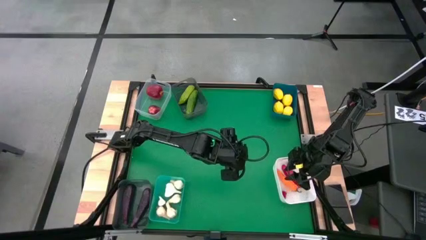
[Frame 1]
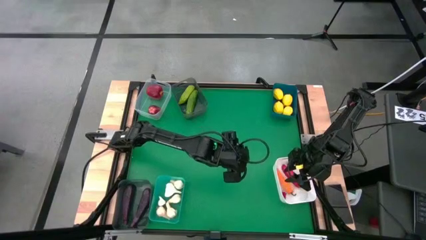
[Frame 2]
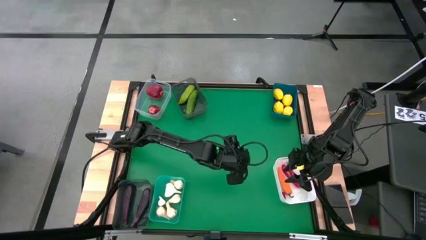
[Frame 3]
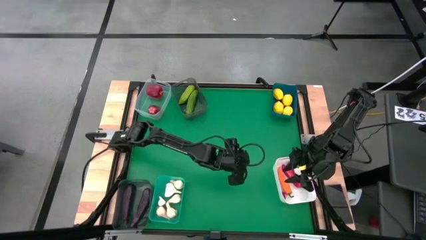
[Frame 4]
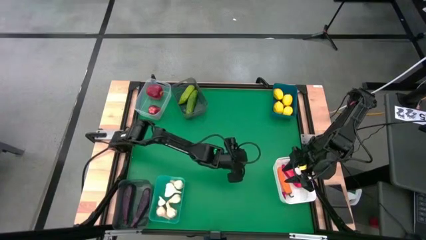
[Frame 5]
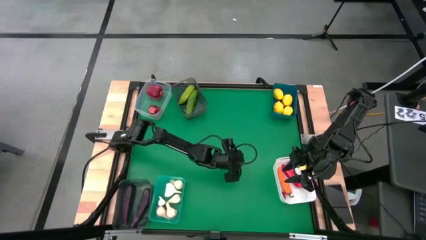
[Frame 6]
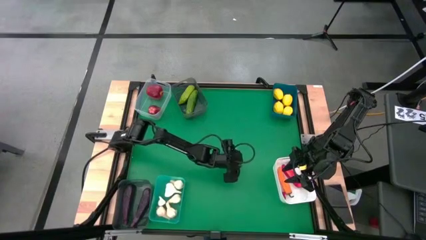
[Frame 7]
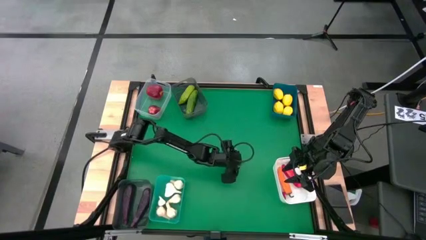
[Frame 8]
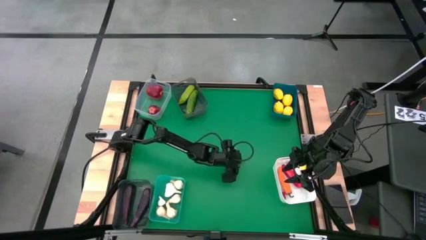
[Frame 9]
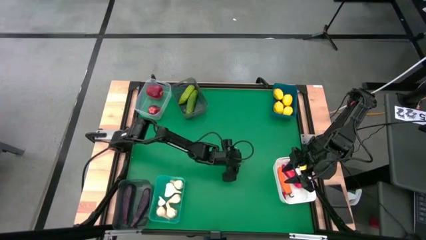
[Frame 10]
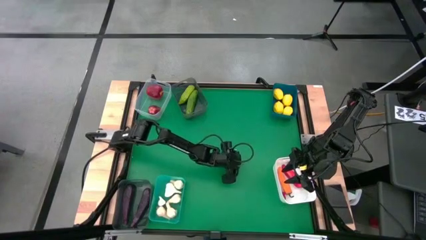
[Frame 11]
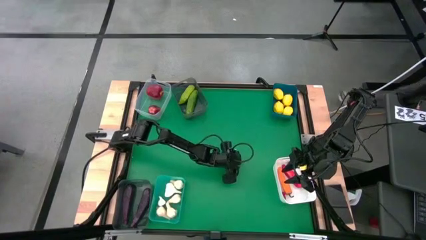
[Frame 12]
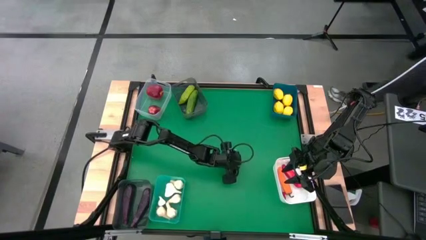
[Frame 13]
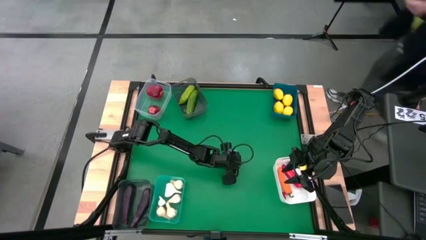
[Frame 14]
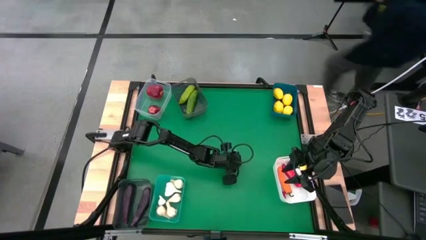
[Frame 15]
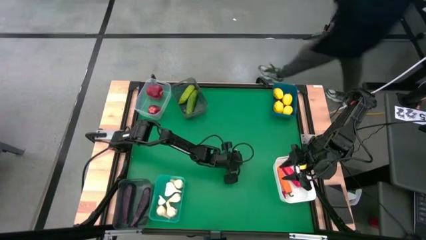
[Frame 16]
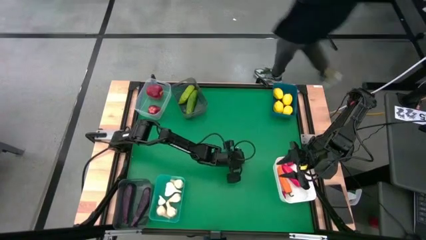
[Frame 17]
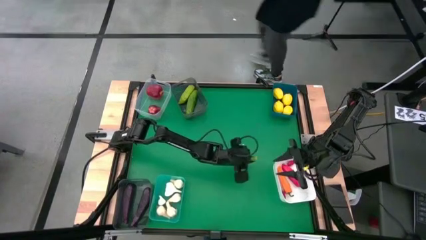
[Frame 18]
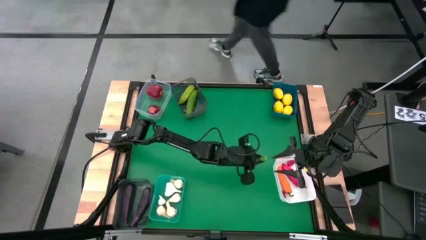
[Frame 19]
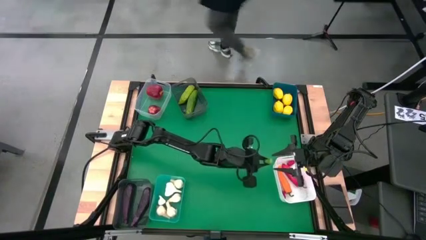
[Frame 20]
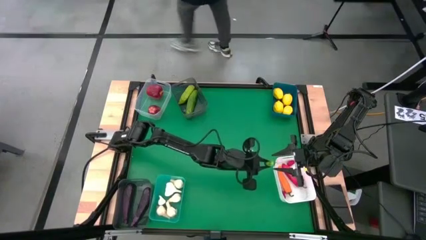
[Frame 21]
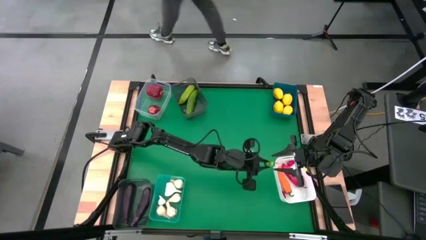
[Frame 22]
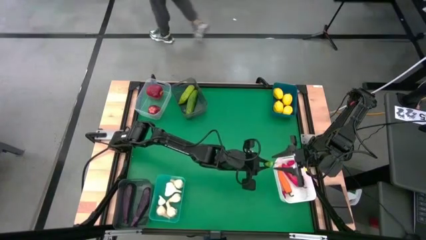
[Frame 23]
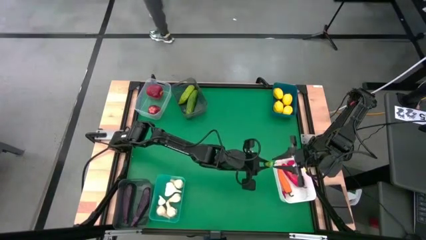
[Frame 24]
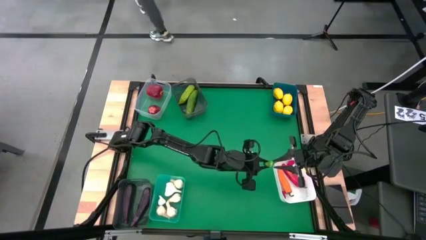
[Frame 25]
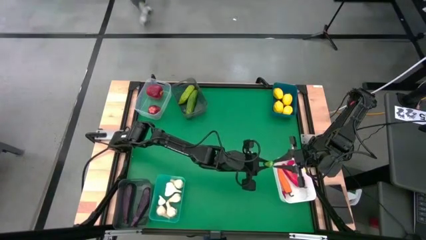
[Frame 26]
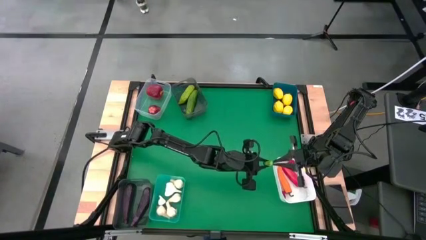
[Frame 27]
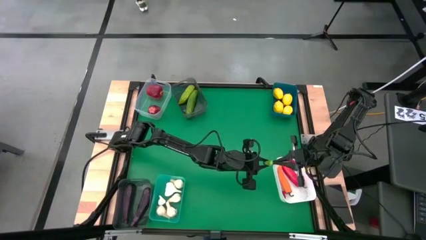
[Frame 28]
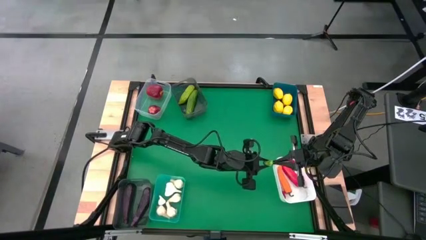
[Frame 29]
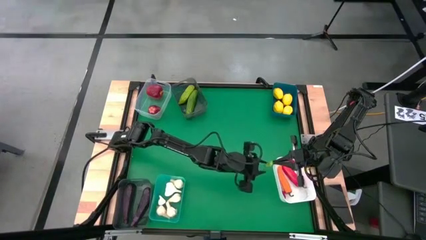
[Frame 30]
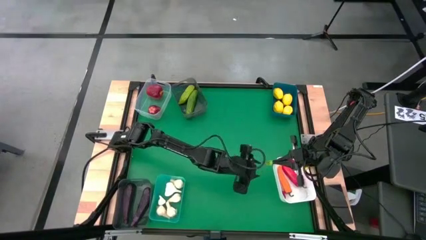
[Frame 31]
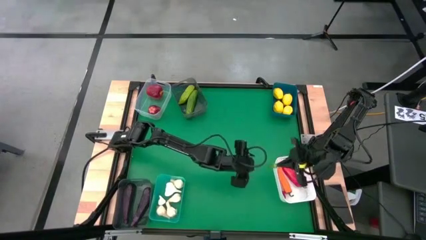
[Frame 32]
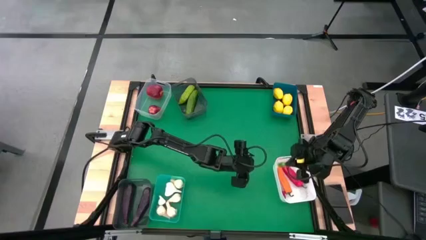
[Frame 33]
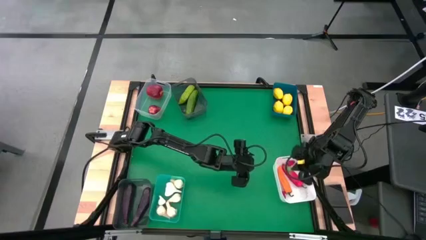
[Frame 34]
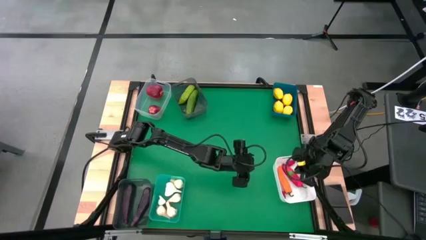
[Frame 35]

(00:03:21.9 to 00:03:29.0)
Task: Sort produce into baskets
Put the green chili pepper into the white bin

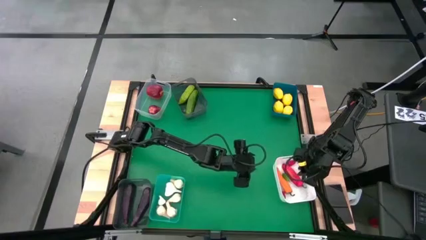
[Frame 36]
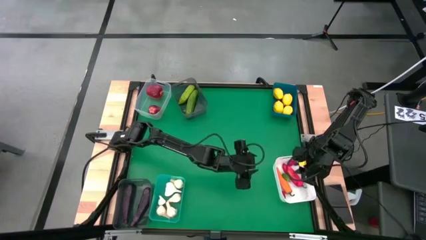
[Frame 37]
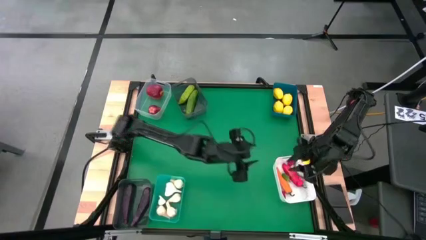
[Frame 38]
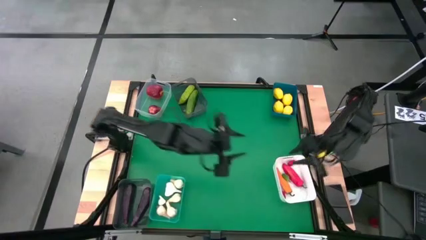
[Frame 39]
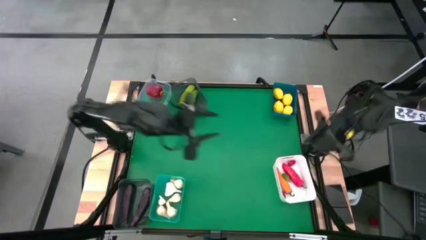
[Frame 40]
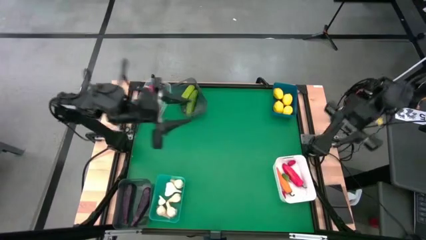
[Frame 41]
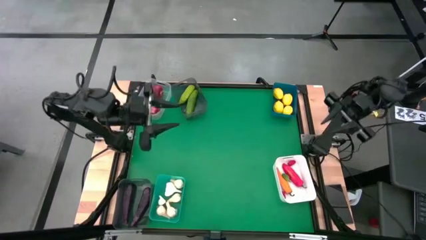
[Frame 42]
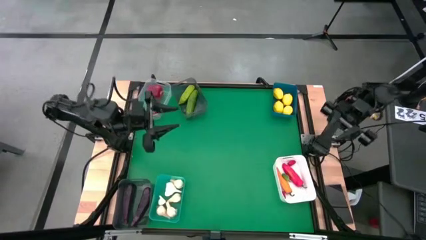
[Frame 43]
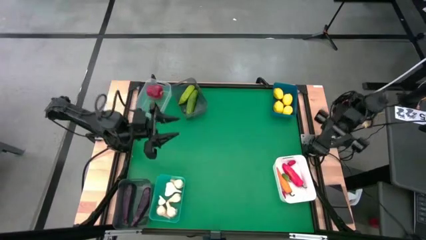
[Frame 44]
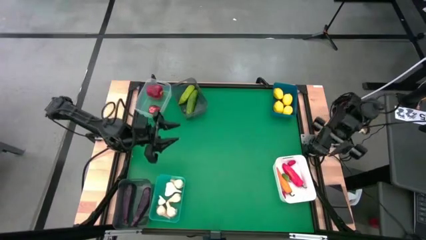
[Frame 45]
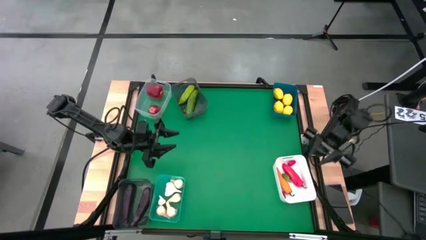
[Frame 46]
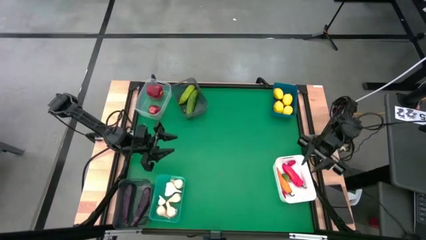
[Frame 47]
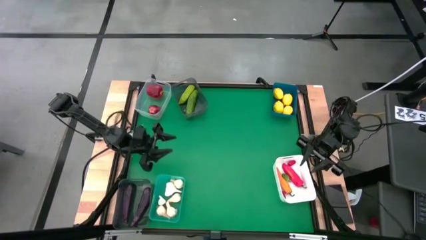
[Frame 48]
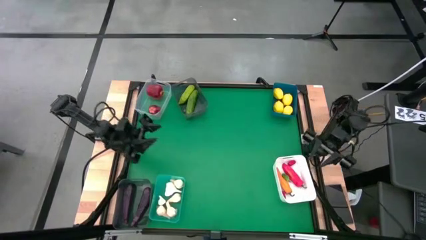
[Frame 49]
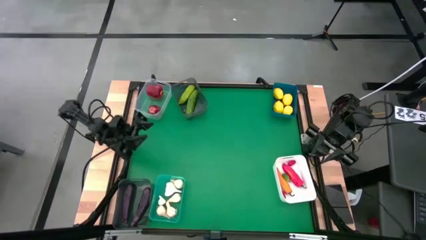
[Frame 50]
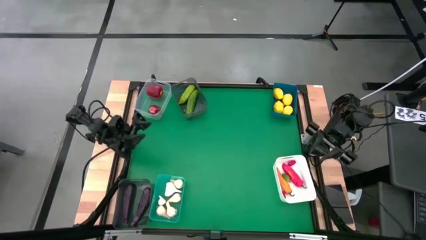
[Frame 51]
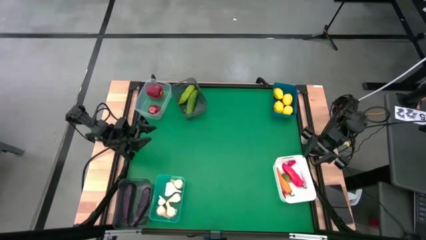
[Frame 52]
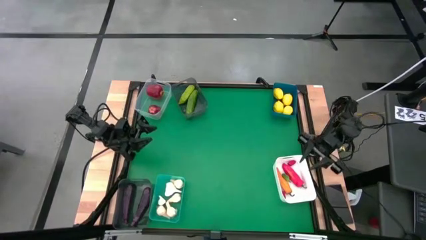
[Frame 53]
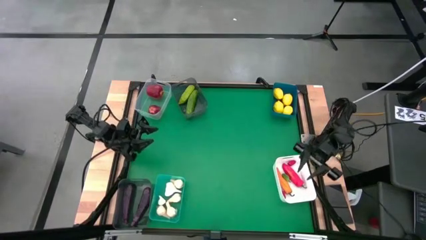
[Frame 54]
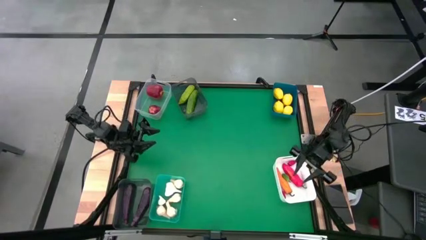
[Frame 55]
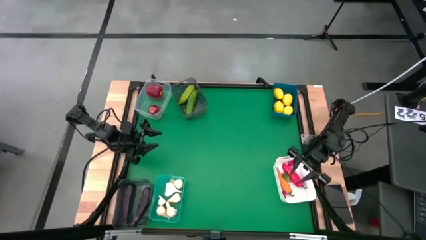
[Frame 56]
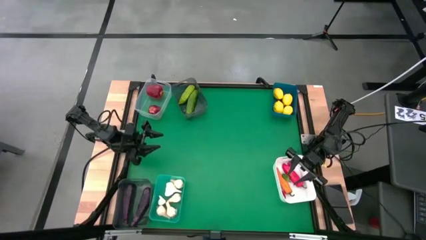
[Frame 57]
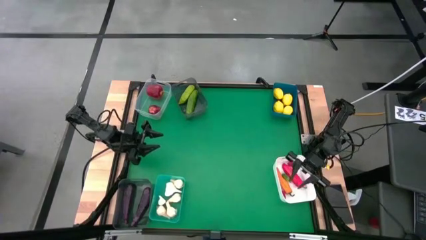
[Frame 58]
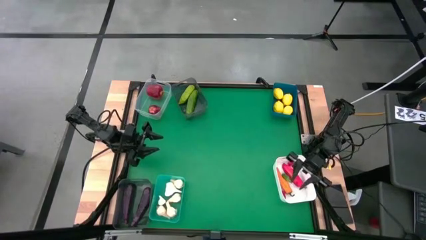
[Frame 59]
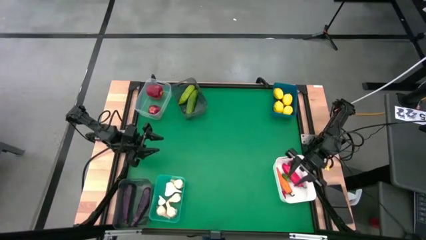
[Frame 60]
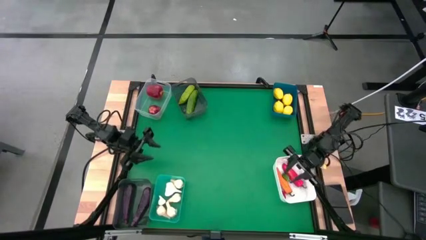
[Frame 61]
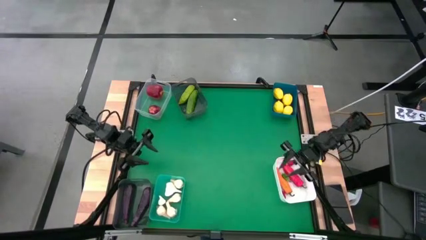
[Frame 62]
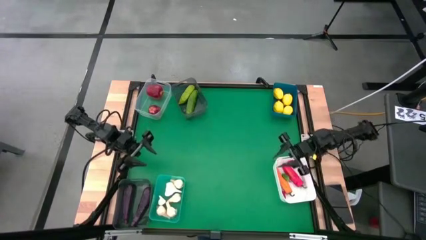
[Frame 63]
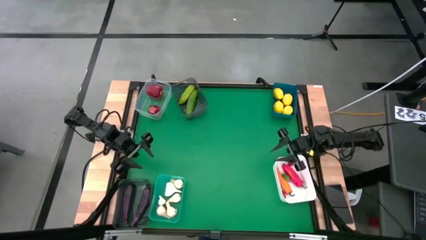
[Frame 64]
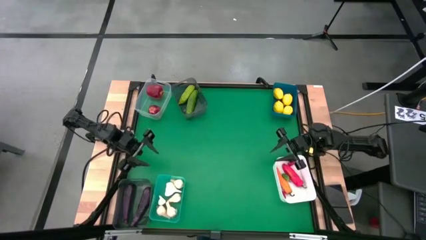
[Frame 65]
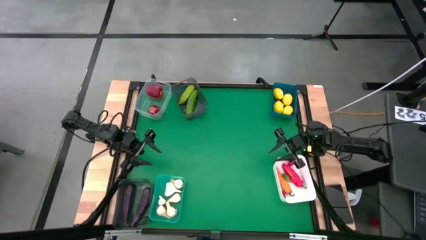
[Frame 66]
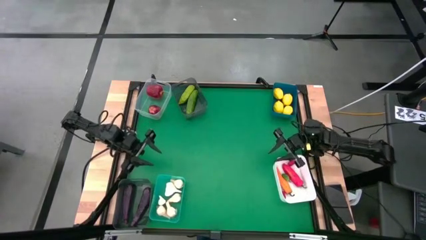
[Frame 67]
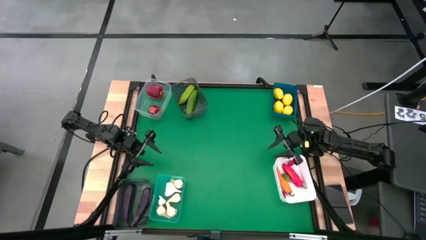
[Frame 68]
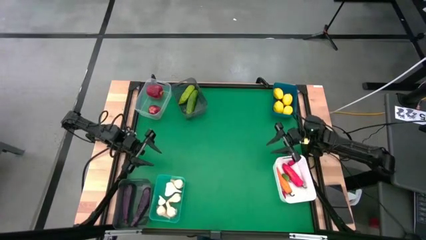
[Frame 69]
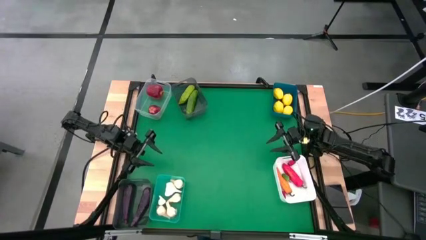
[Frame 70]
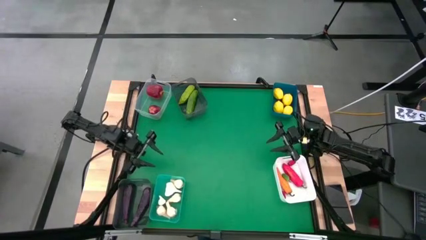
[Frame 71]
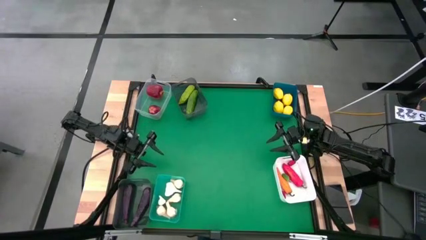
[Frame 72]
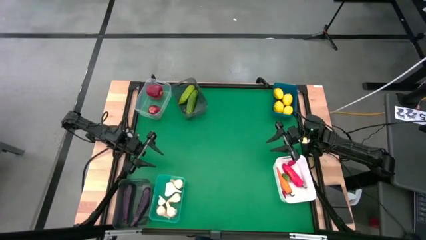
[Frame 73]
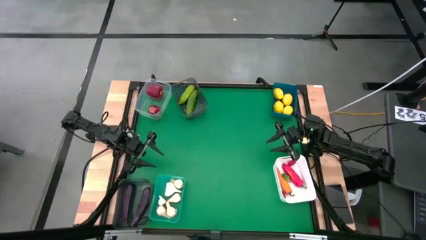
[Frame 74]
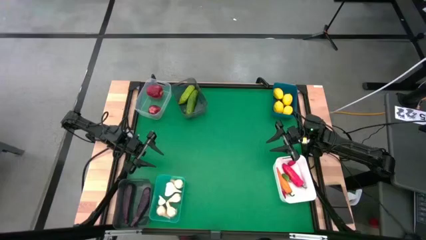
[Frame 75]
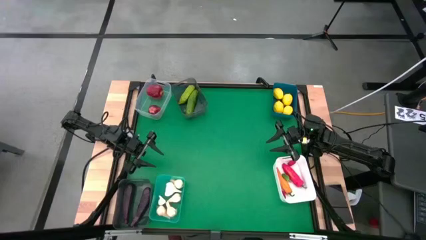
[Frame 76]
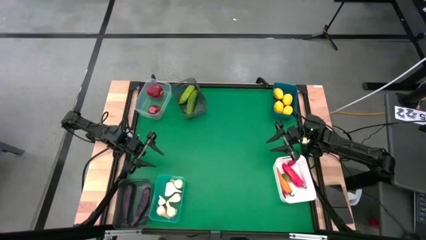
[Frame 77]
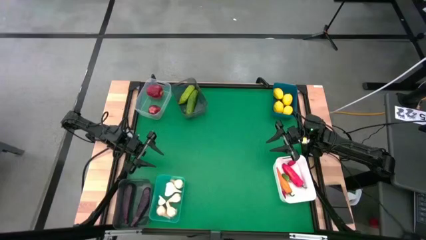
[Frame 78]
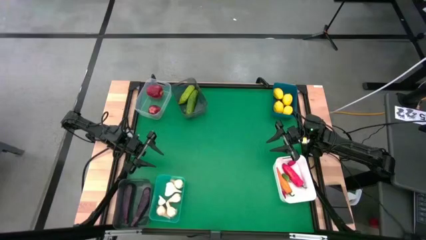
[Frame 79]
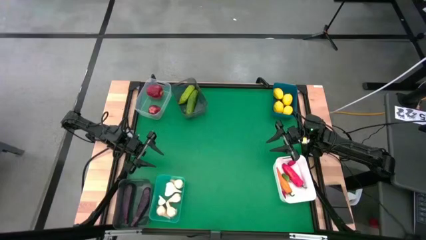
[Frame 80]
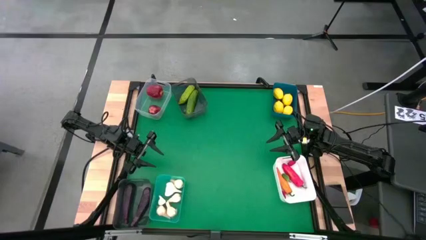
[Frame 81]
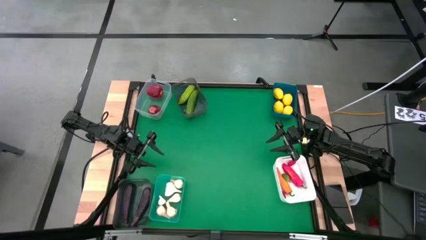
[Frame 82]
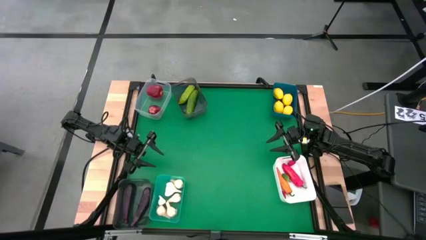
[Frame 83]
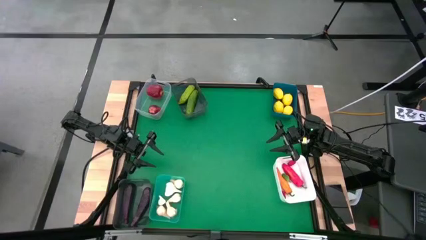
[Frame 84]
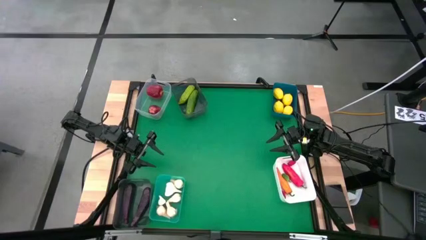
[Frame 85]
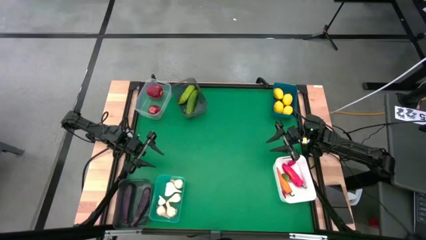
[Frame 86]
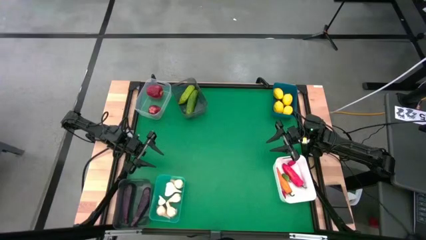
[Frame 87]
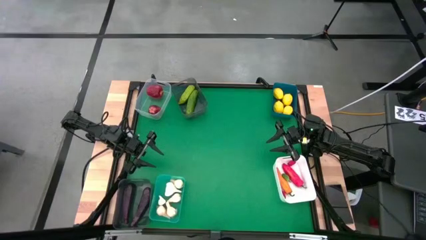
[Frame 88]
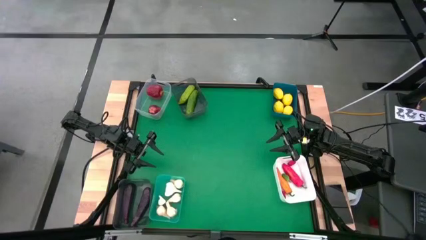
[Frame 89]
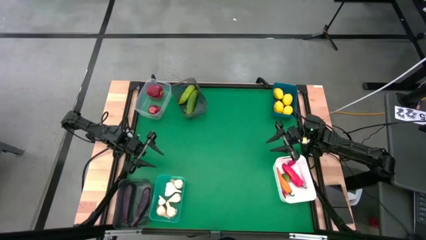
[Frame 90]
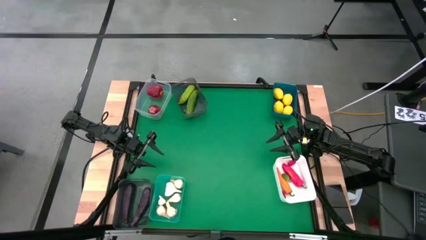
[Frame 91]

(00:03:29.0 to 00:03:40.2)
Return to Home Position
